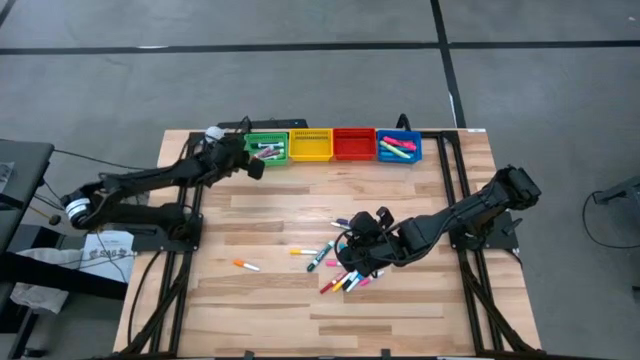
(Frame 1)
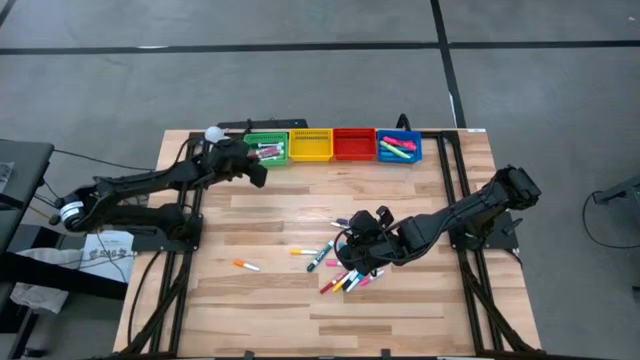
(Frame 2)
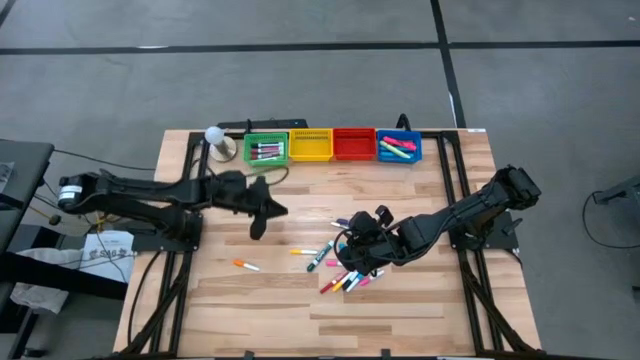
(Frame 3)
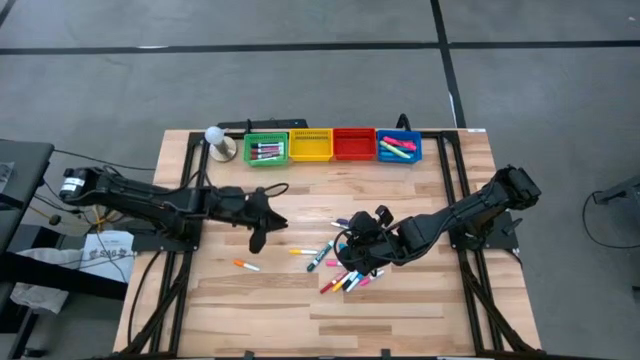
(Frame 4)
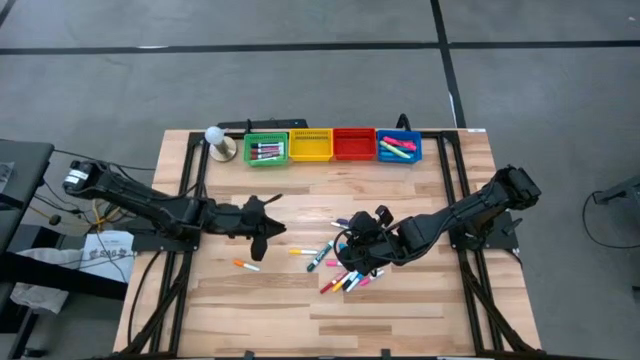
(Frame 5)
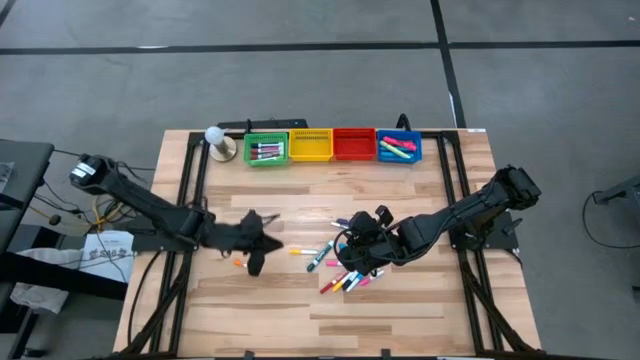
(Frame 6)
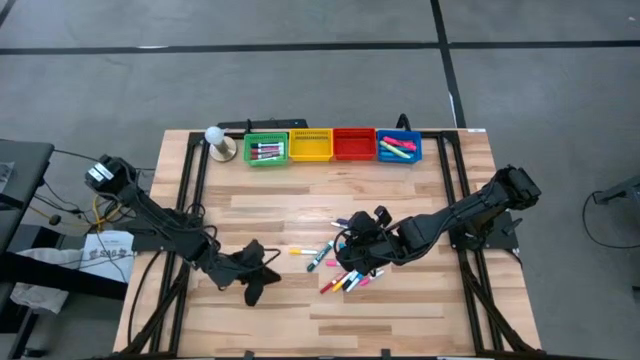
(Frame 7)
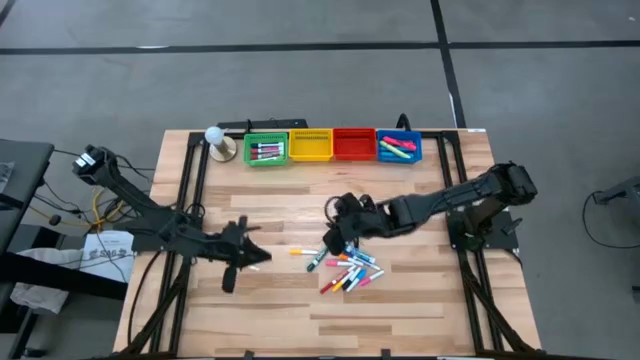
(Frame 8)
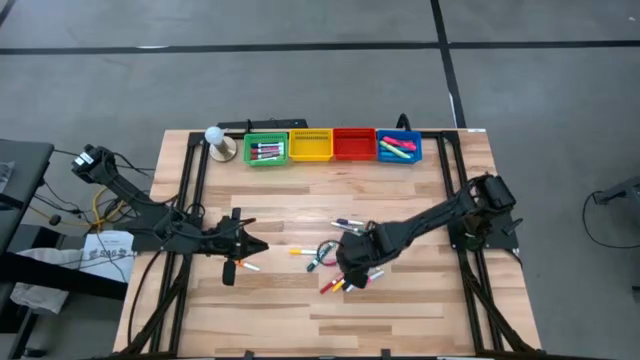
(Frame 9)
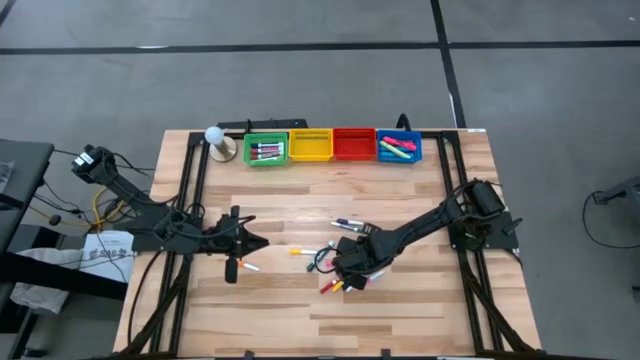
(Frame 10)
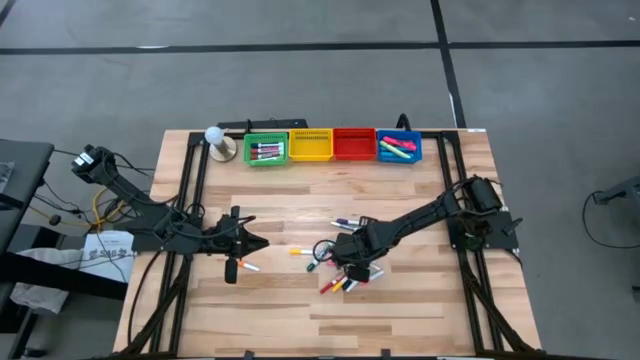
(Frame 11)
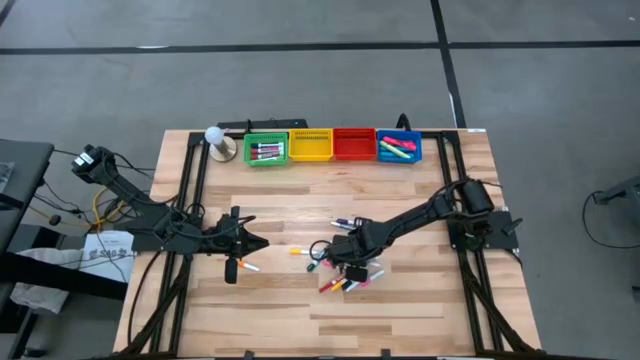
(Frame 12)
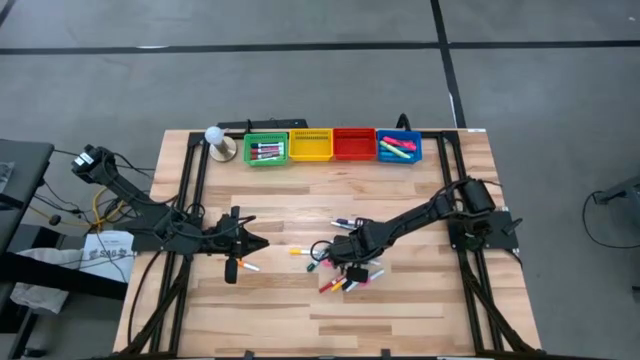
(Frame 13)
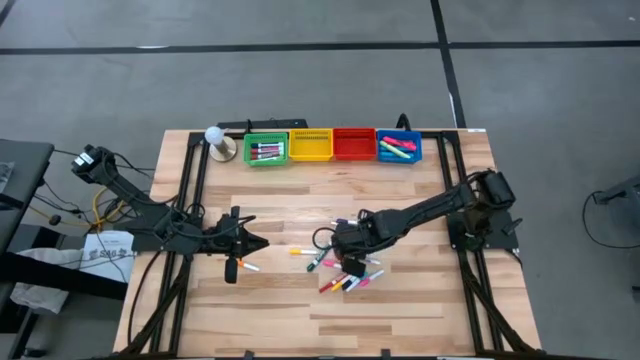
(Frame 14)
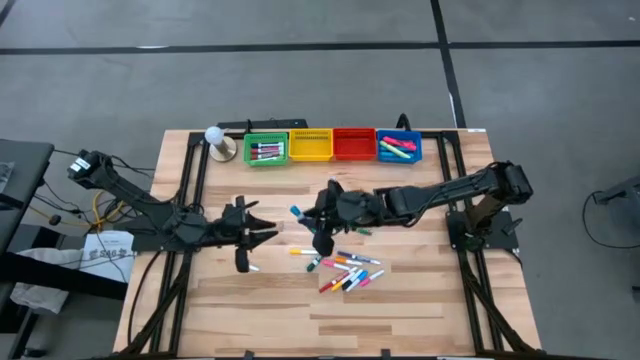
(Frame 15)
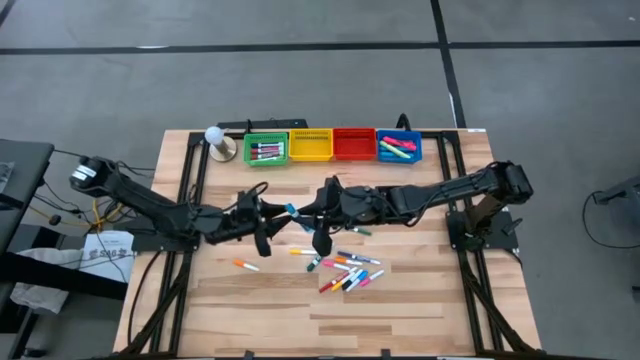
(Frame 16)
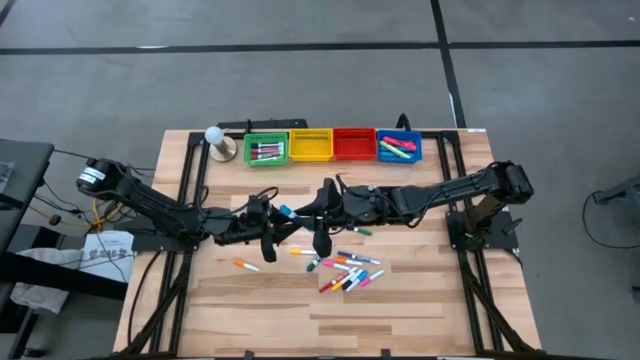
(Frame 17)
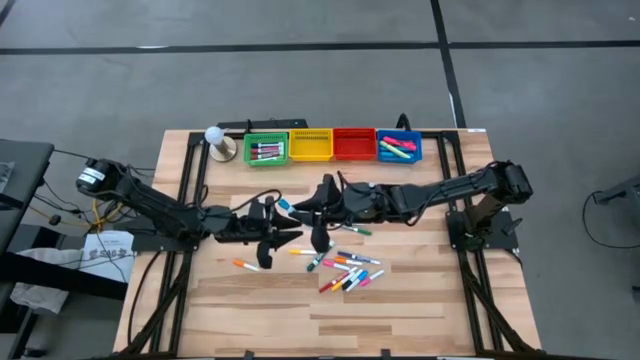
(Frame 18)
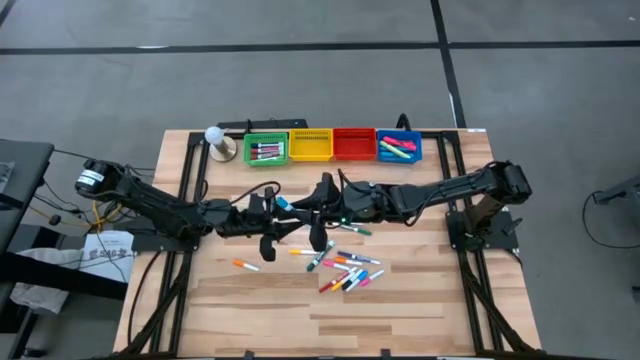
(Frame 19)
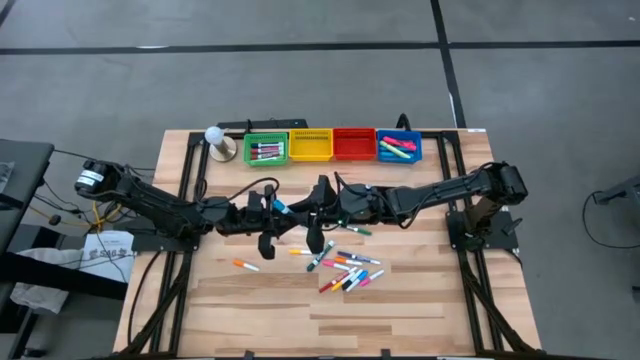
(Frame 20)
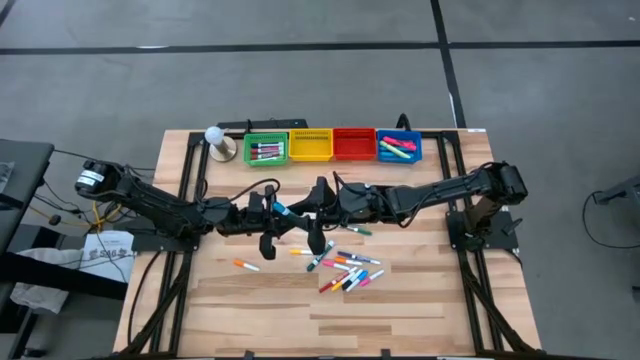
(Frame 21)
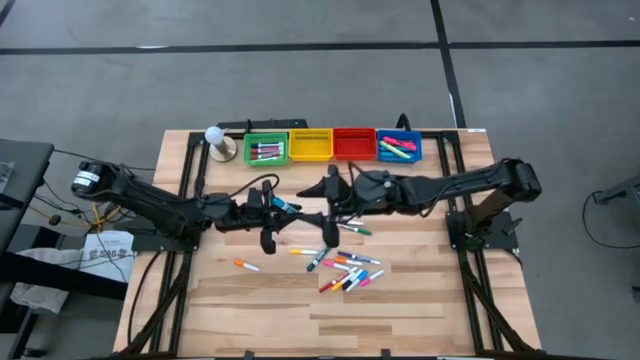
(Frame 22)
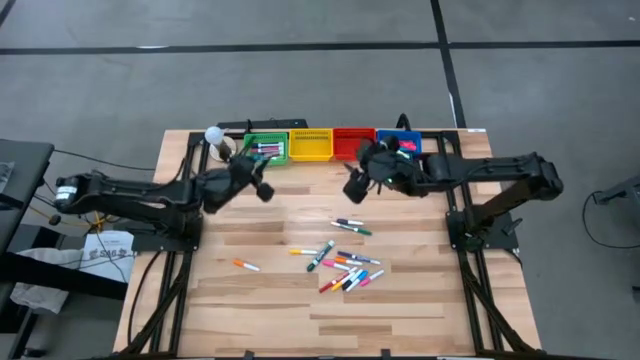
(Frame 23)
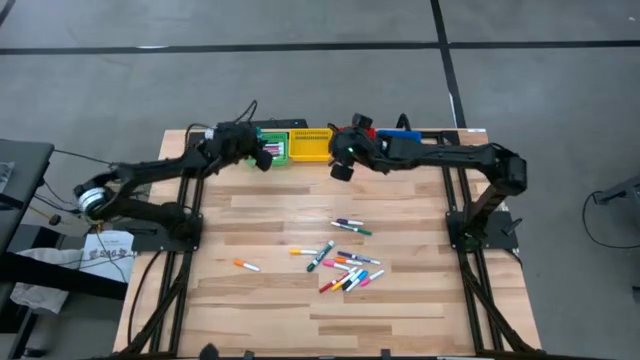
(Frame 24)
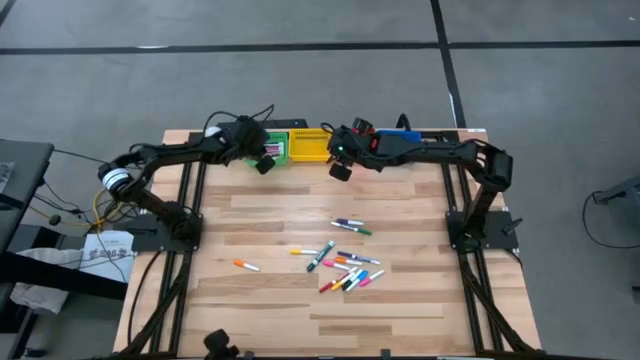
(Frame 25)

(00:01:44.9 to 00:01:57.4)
Task: Pick & Place Markers
Put the light blue marker pen into the green basket

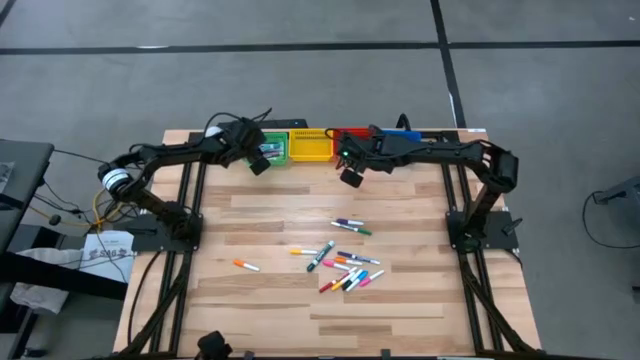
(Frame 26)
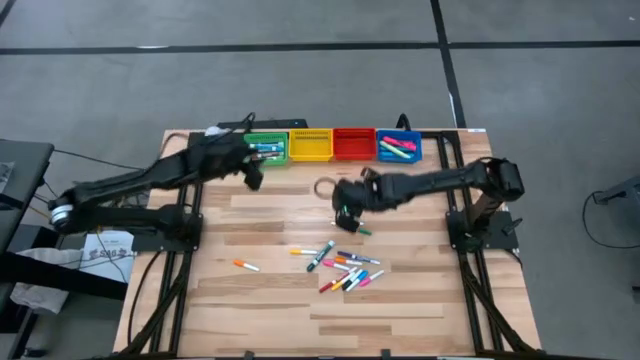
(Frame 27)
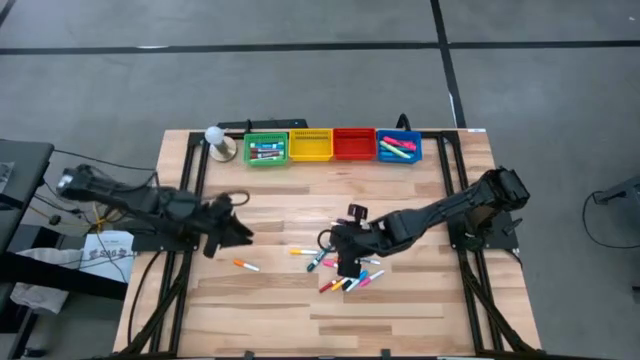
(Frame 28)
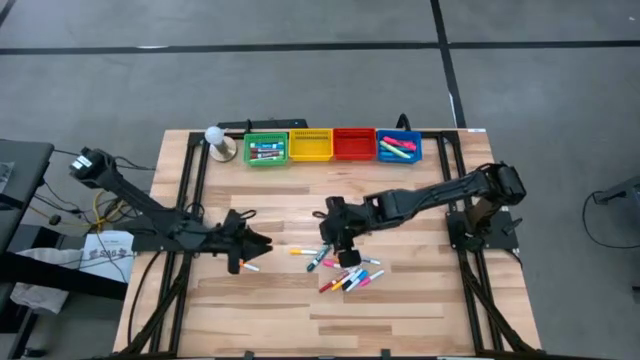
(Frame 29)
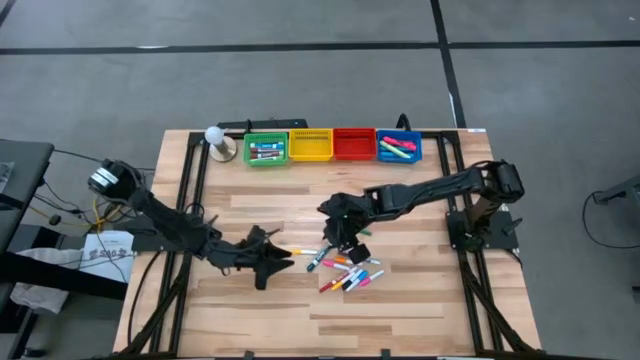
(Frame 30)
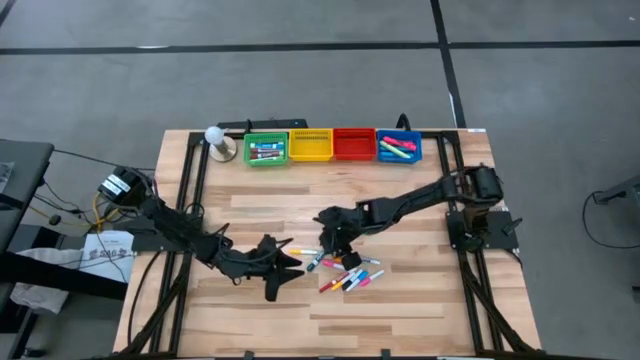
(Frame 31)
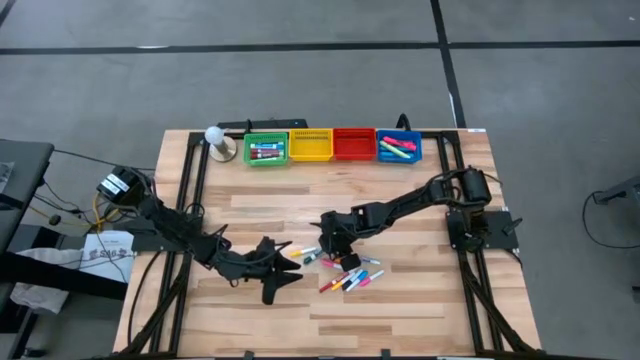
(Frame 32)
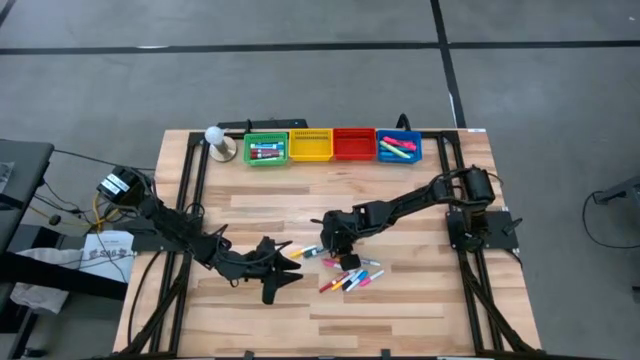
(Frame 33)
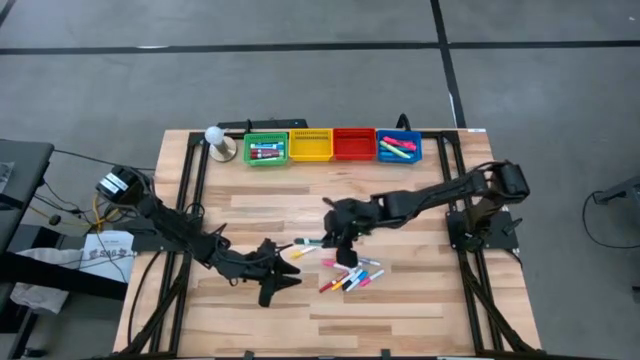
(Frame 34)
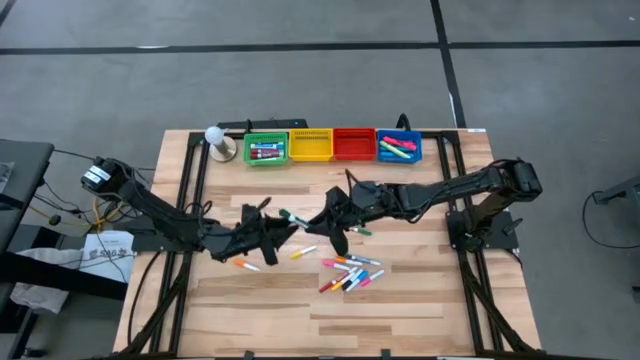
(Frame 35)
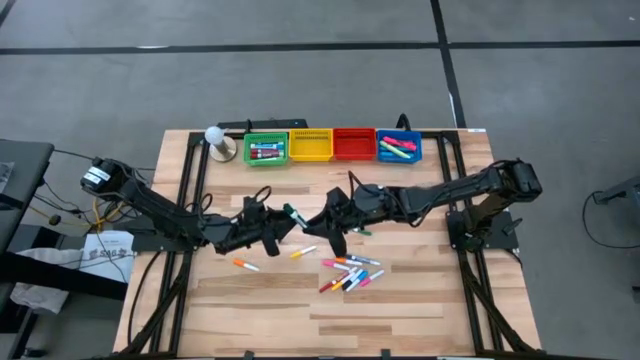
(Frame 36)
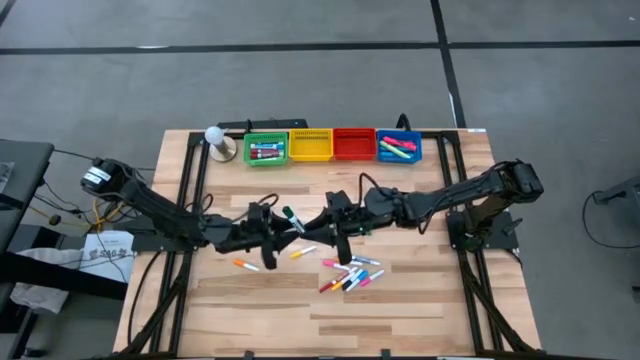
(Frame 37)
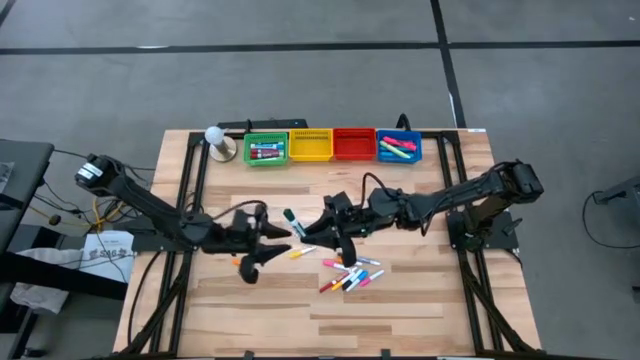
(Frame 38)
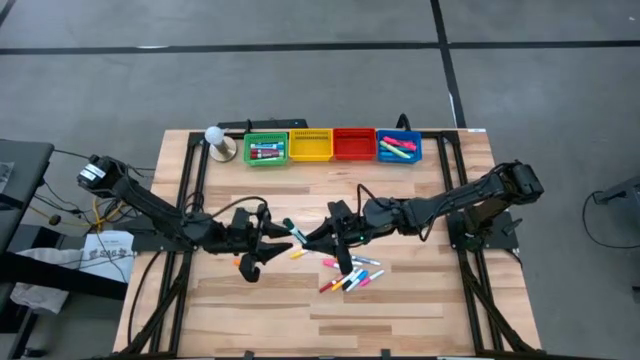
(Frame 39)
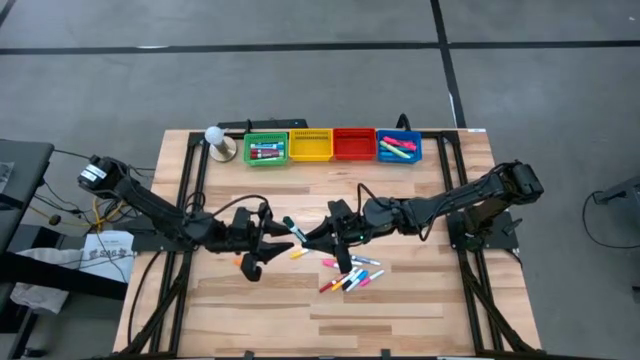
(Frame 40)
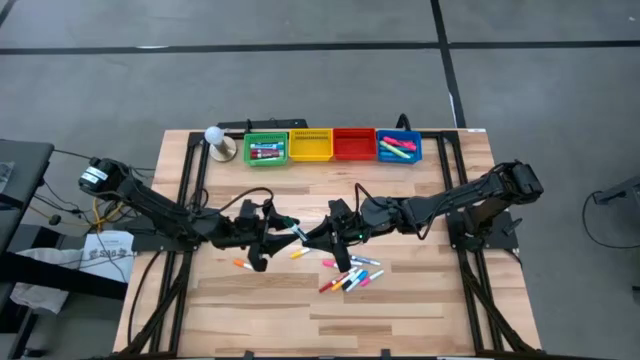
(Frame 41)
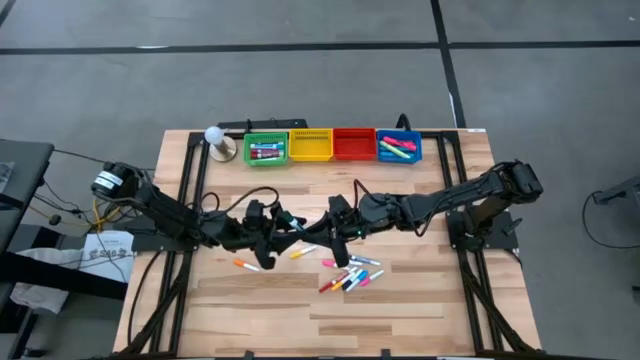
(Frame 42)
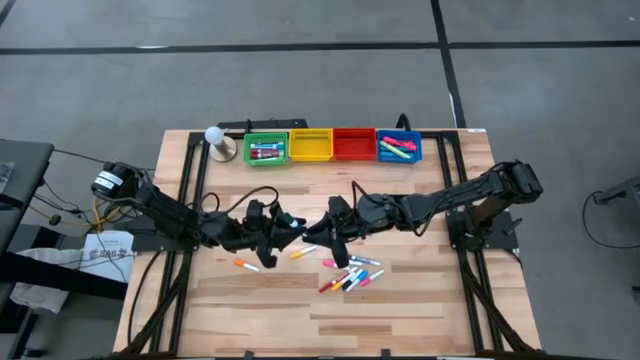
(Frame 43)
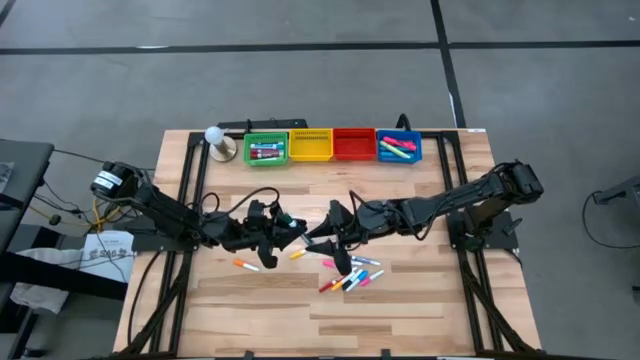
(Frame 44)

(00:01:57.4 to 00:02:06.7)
Put the green marker pen into the green basket
